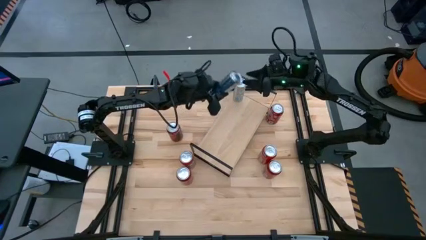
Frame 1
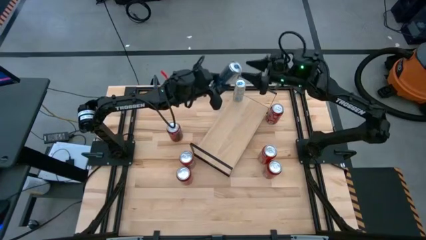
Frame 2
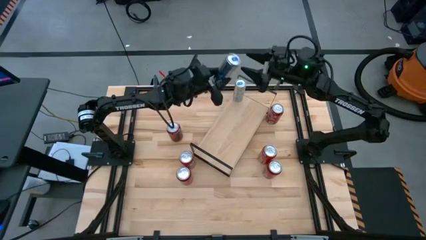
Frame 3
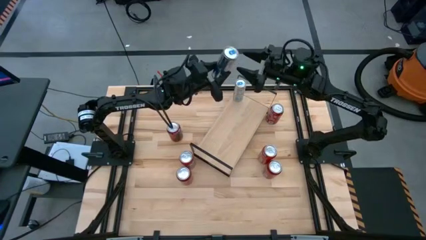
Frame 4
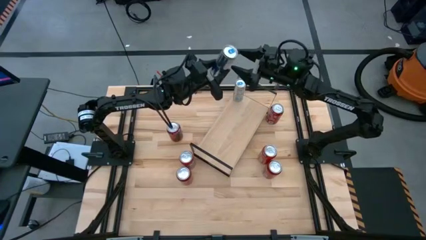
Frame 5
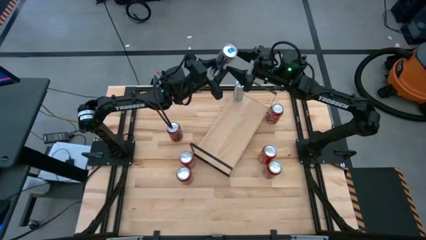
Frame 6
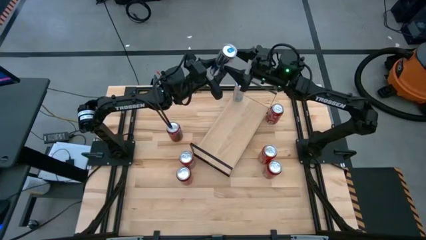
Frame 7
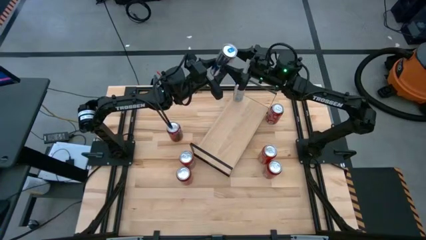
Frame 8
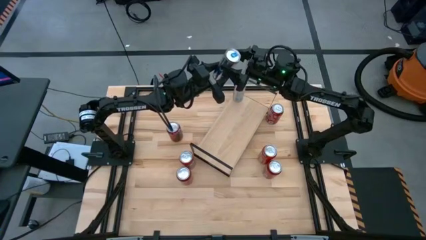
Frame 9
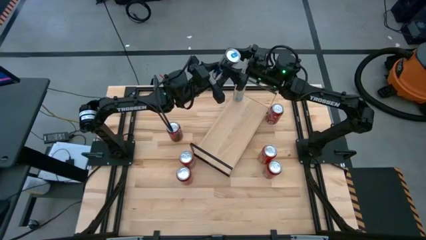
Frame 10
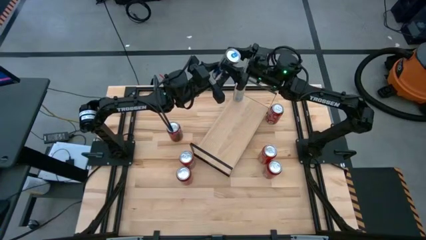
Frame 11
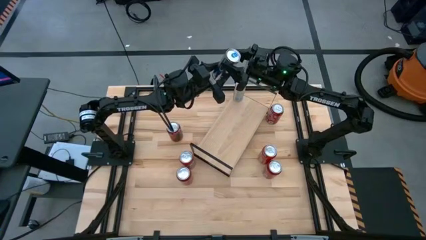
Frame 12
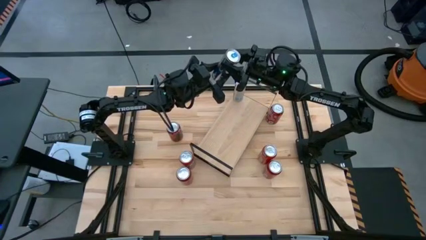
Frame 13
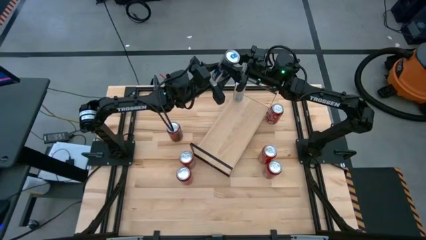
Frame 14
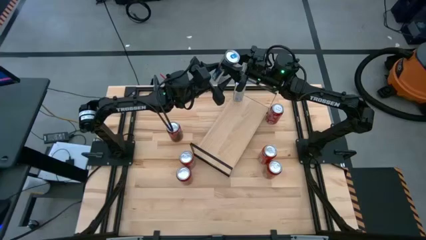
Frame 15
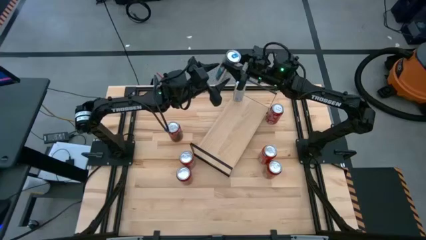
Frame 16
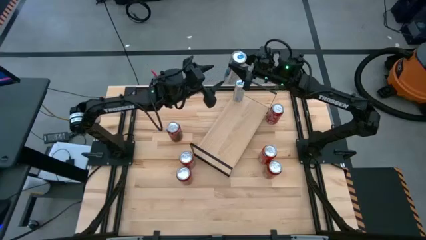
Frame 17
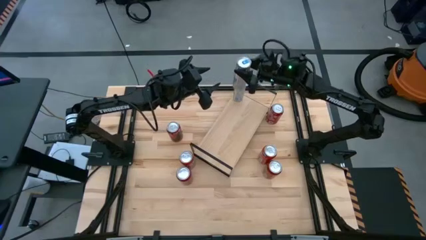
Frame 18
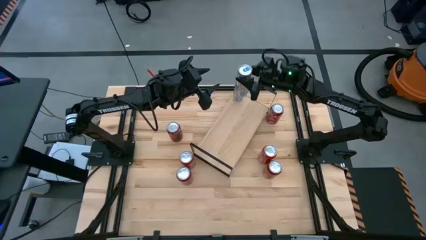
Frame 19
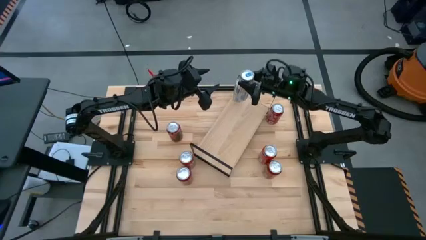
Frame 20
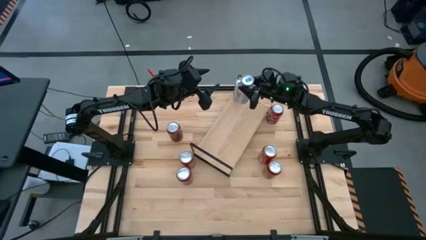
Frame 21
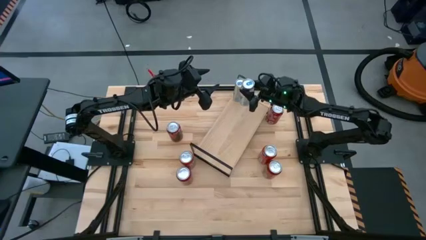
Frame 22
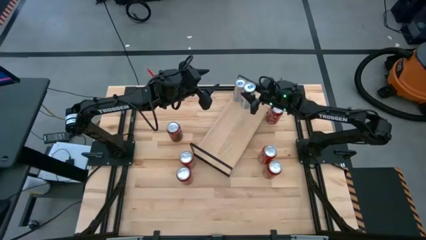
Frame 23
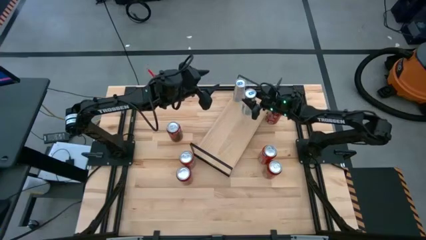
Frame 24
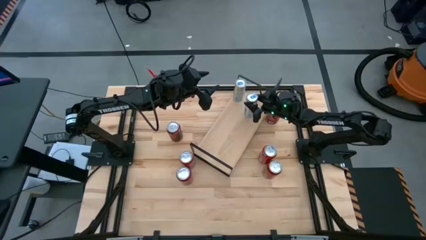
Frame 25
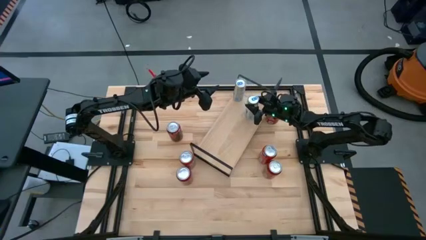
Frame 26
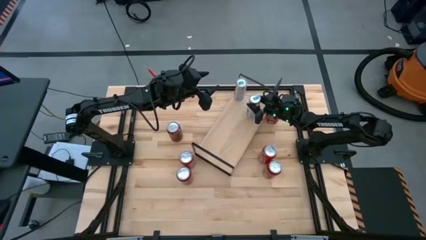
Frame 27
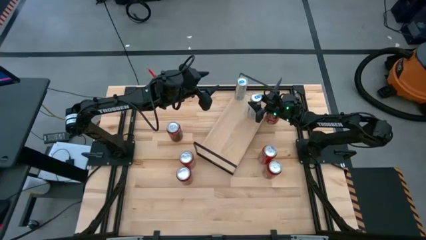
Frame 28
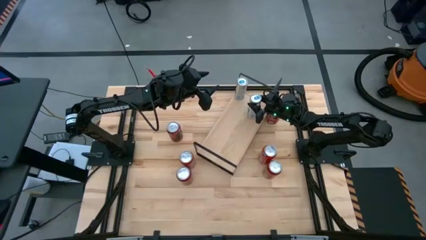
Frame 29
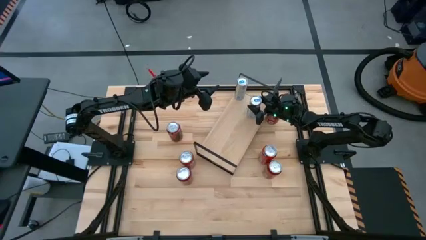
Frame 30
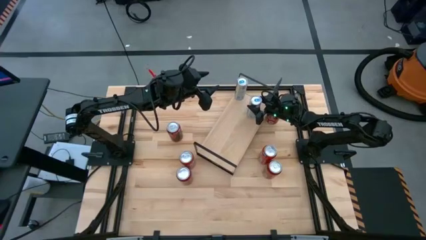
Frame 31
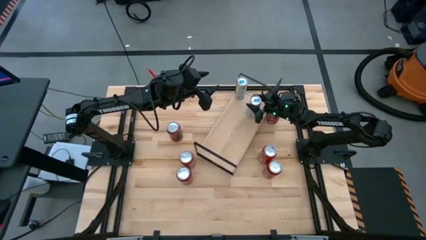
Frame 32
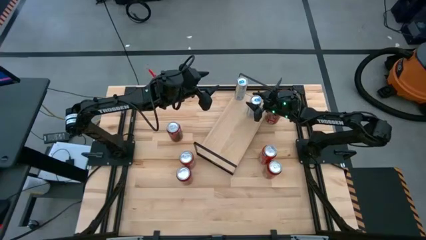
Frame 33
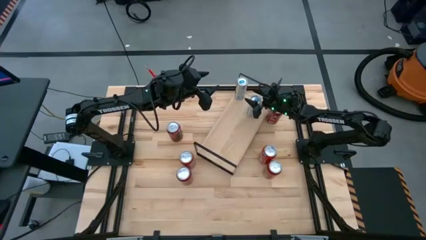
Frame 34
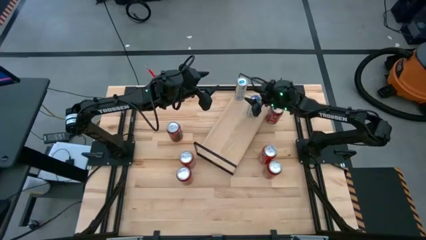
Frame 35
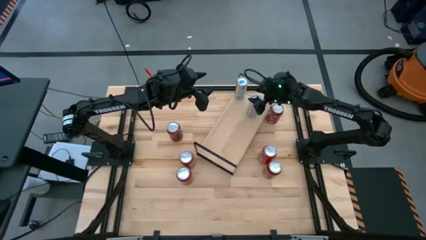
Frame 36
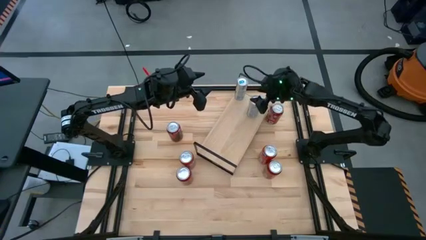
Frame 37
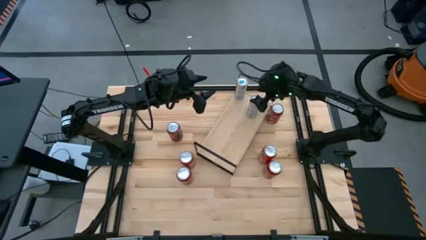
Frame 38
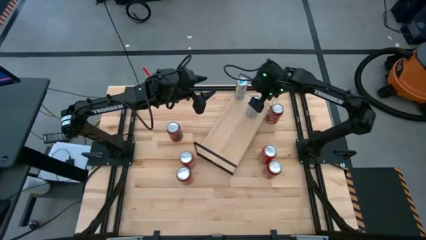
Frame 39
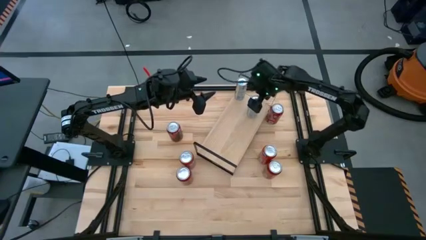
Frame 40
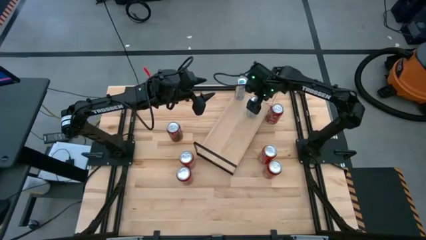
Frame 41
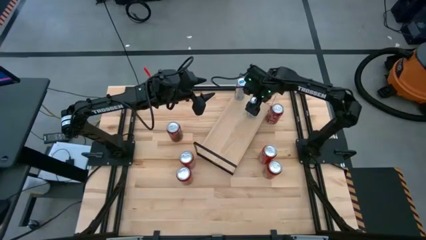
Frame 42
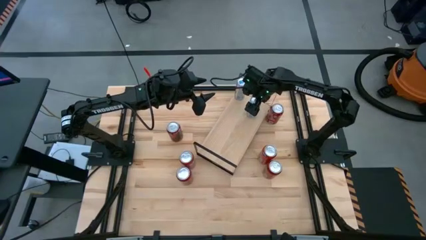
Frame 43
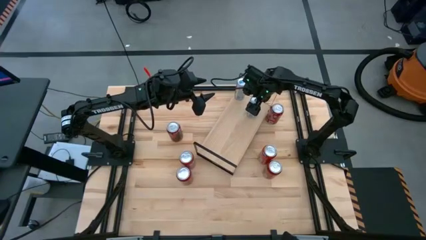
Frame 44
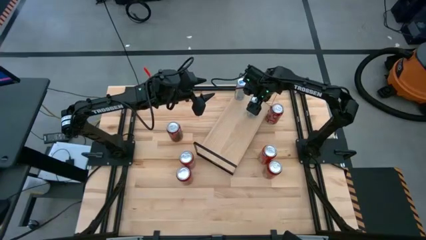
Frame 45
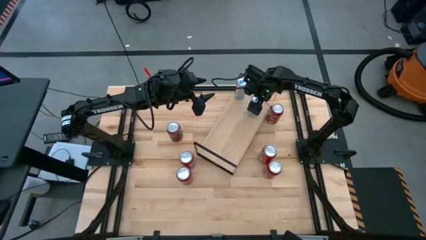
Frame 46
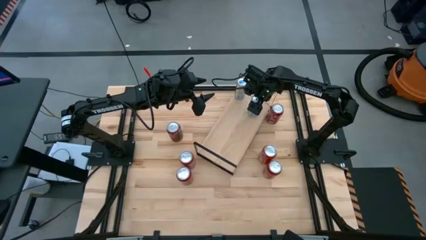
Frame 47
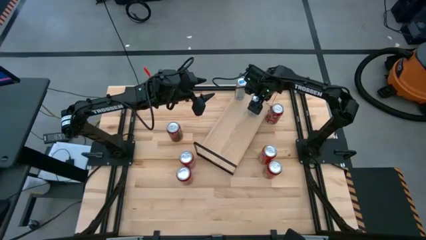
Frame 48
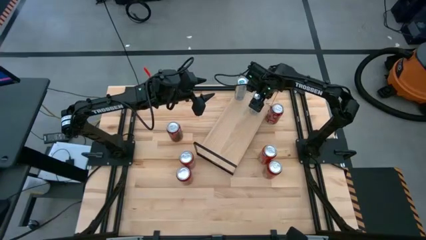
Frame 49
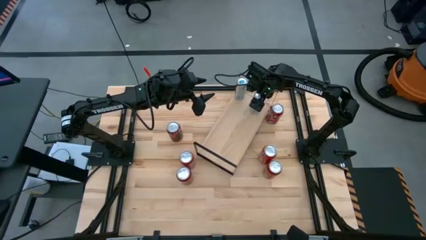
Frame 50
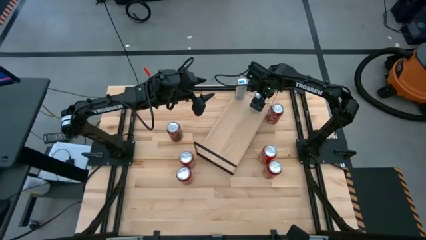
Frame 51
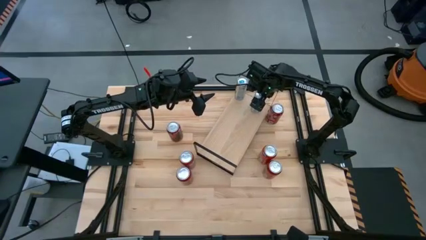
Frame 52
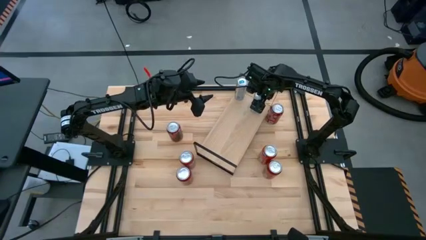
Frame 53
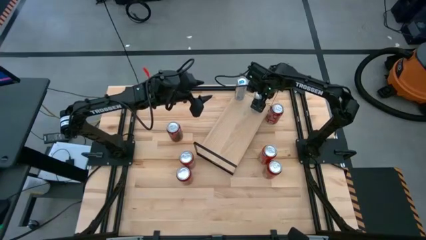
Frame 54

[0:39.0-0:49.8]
Task: Place canned beverage on shelf
Put the blue soda can on the shelf aligned with the other blue soda can

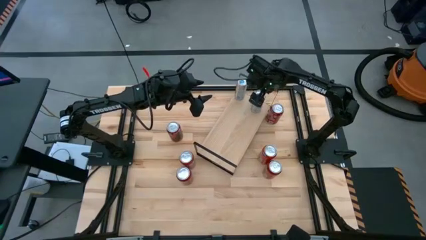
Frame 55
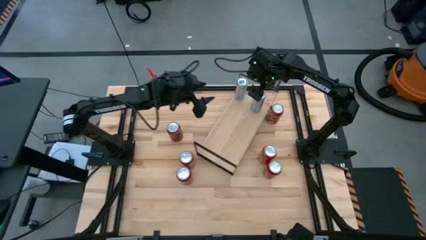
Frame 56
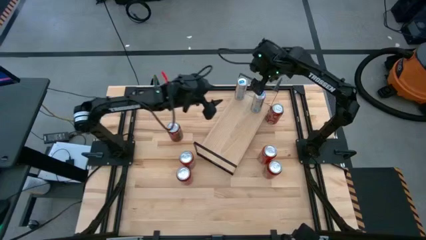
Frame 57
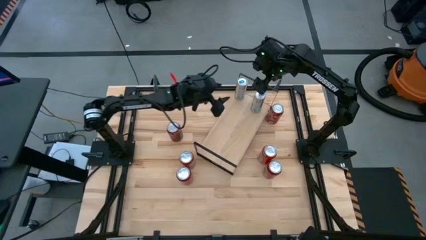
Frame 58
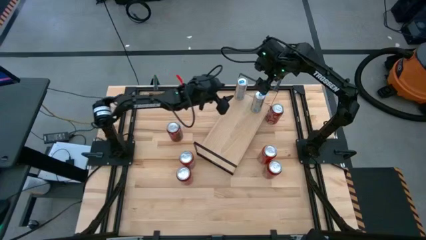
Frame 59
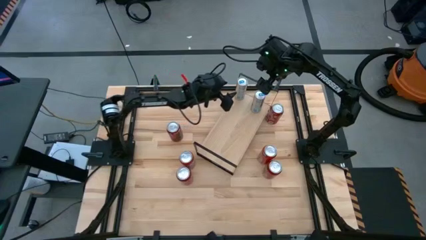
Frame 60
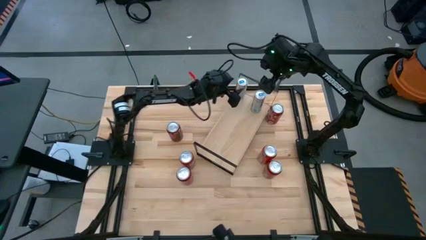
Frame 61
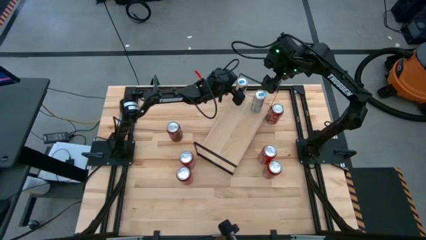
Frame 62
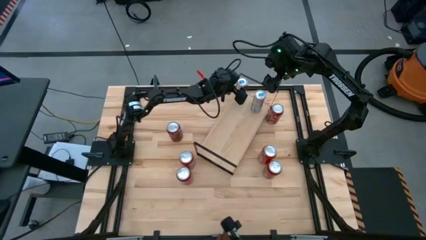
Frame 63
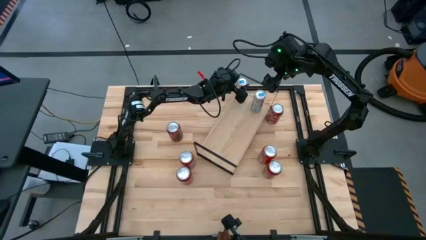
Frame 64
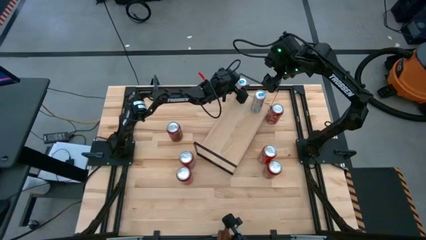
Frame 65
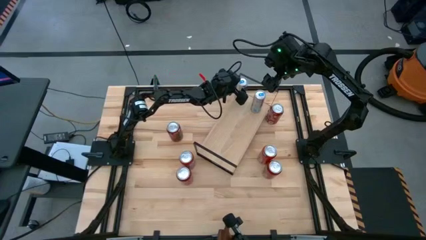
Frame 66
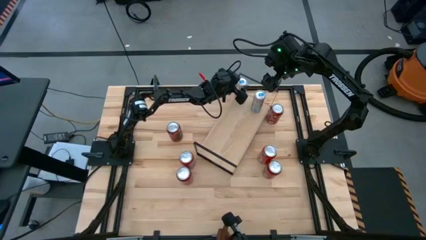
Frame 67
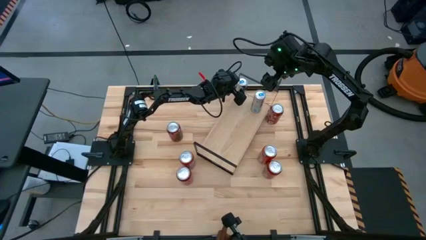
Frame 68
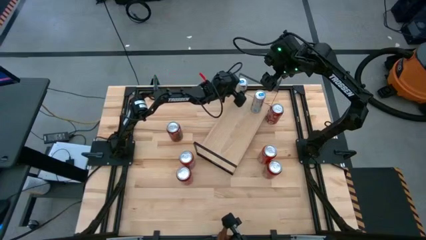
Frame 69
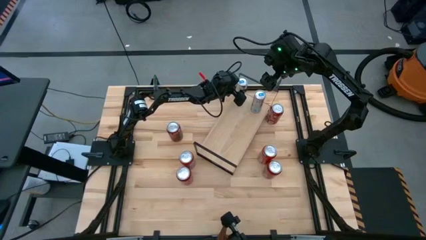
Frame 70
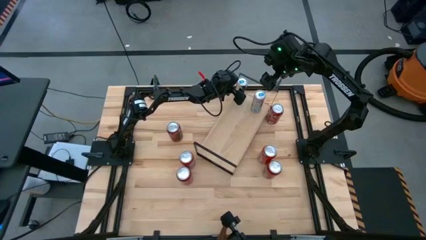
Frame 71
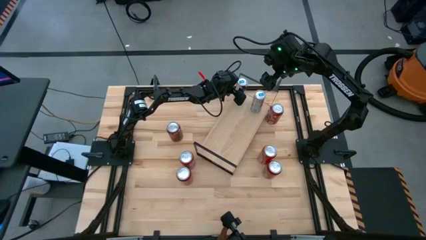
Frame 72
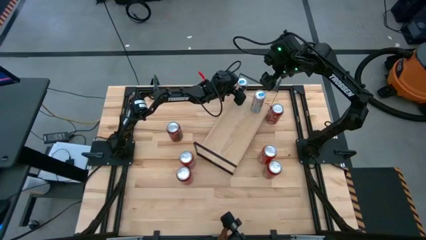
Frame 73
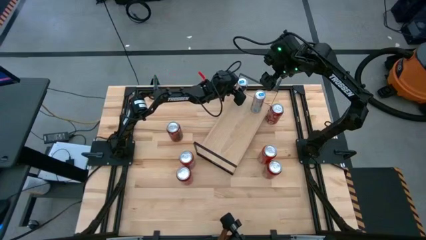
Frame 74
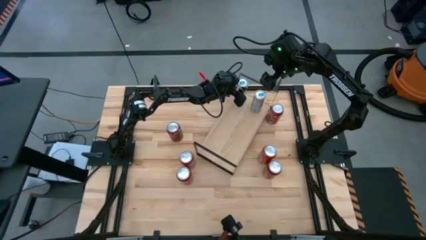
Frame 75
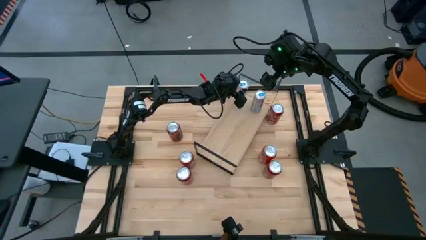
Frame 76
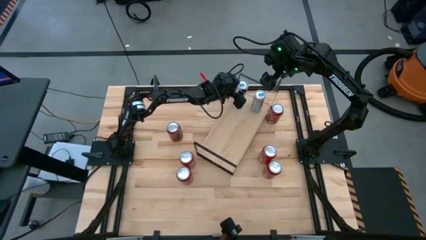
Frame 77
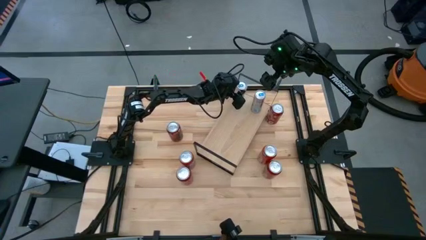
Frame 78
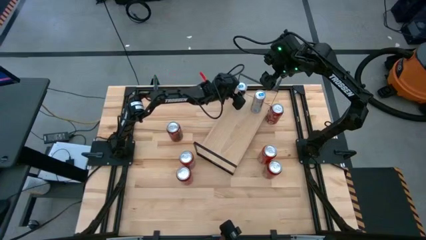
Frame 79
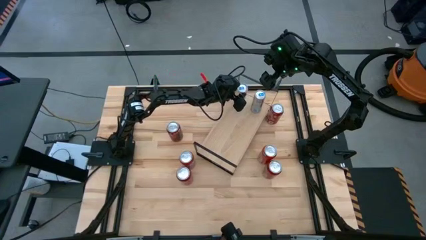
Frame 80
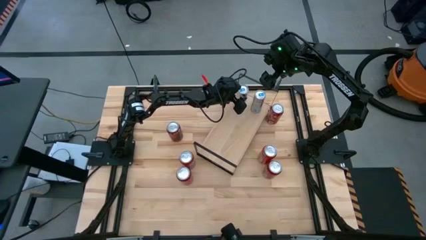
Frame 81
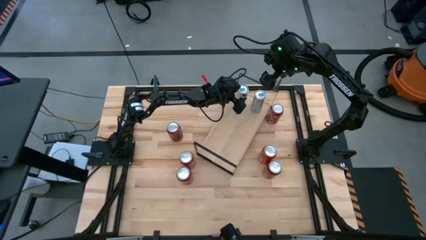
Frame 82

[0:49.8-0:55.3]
Adjust the blue soda can on the shelf
